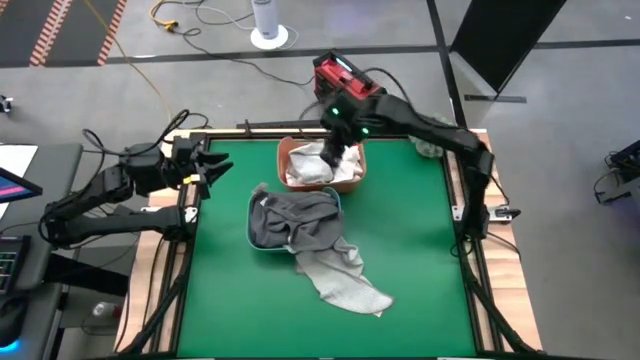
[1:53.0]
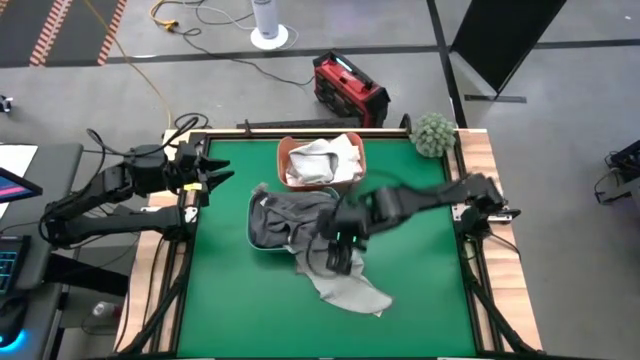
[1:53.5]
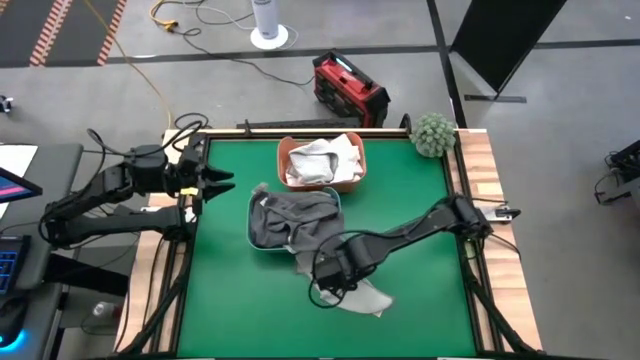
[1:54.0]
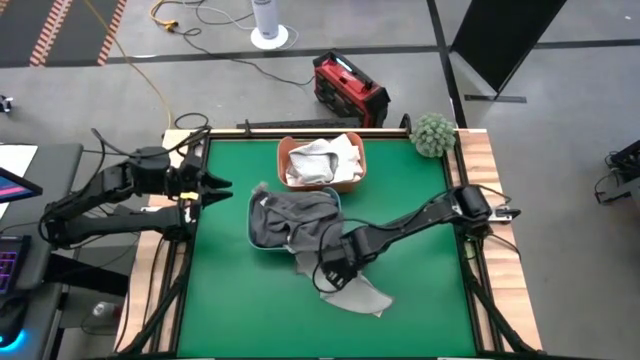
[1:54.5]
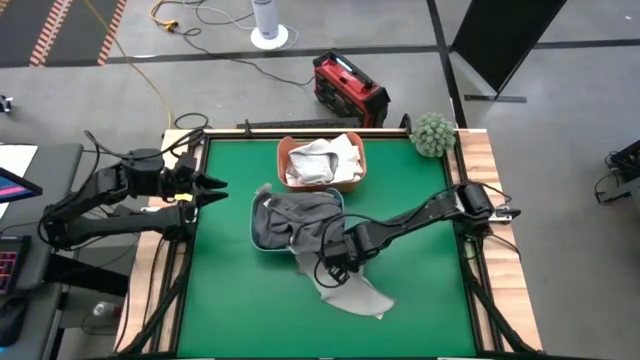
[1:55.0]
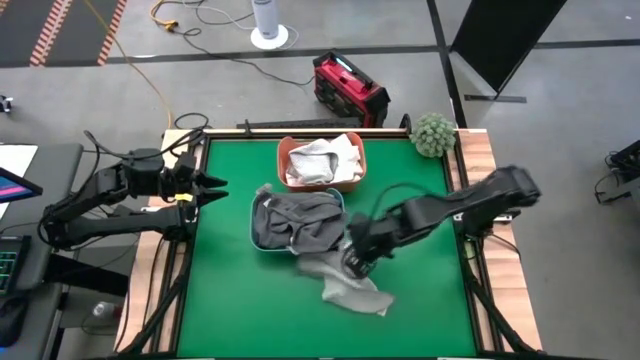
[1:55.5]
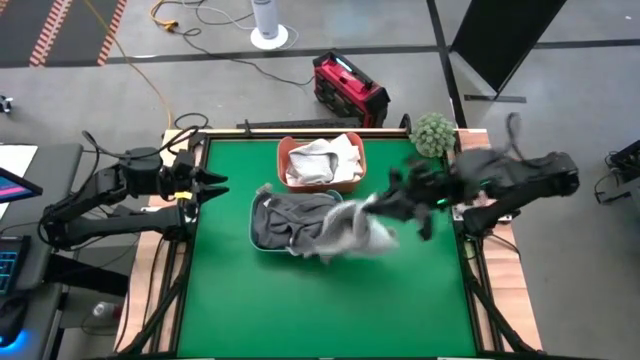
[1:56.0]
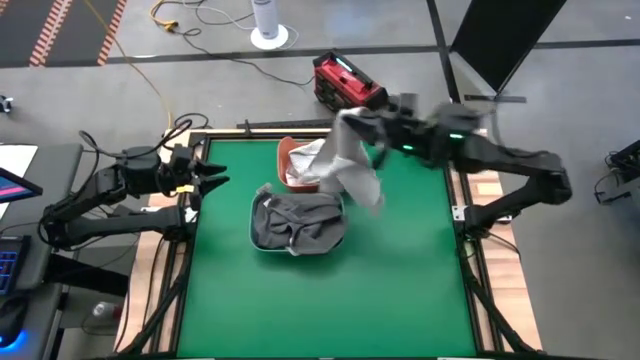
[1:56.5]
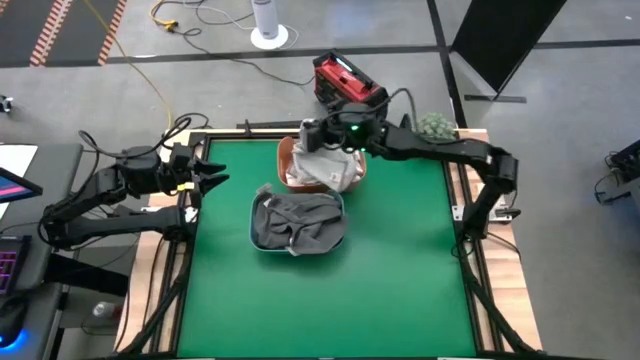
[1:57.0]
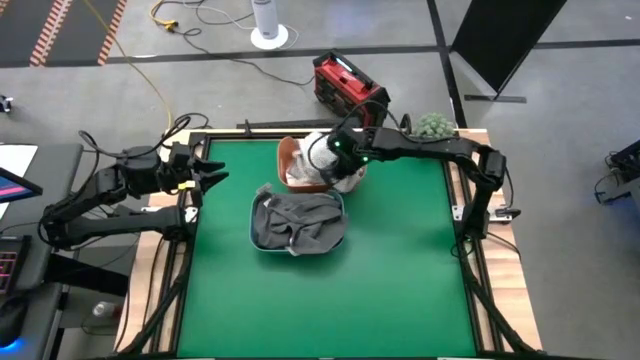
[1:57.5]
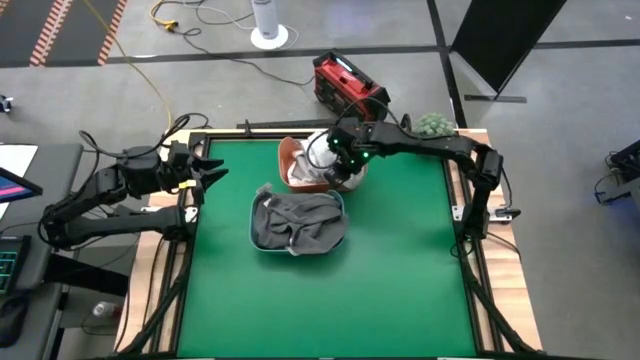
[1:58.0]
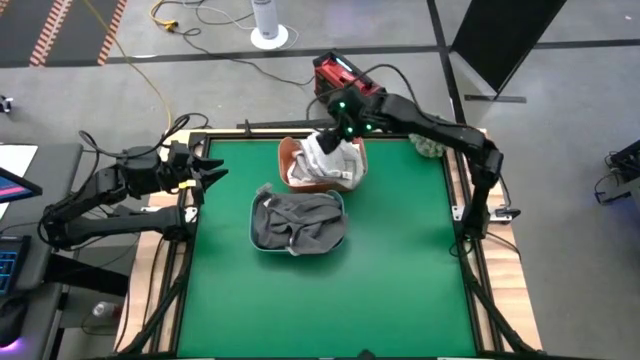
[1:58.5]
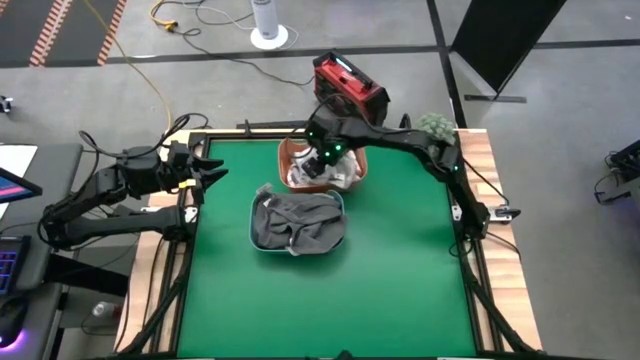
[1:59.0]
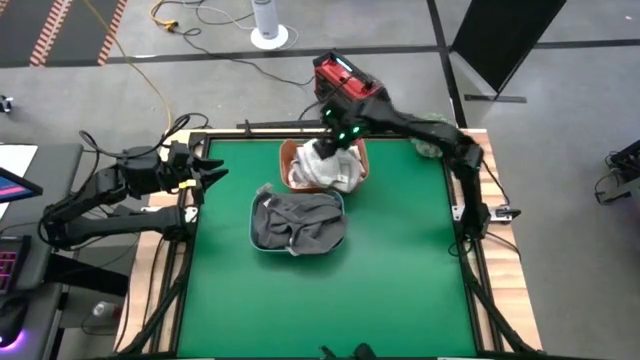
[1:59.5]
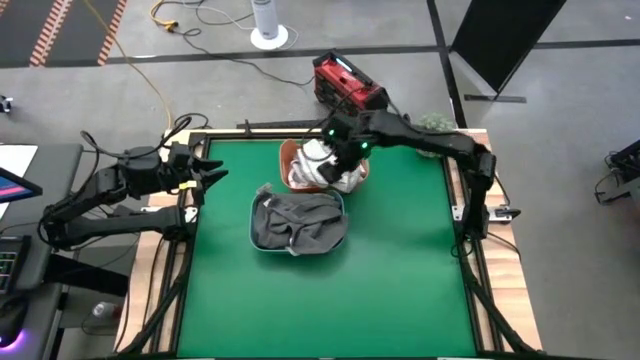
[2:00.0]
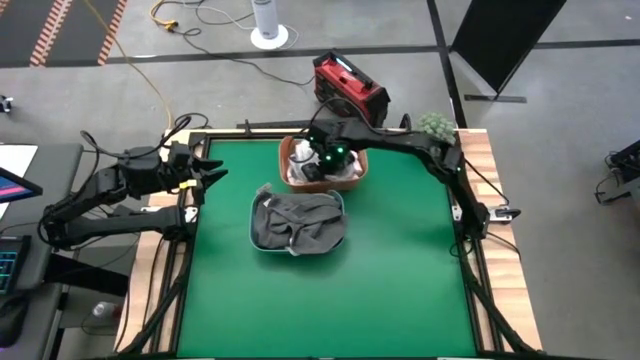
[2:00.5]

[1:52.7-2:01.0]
Task: Sort towels by color in basket
Put the white patterned towel into the orange bin

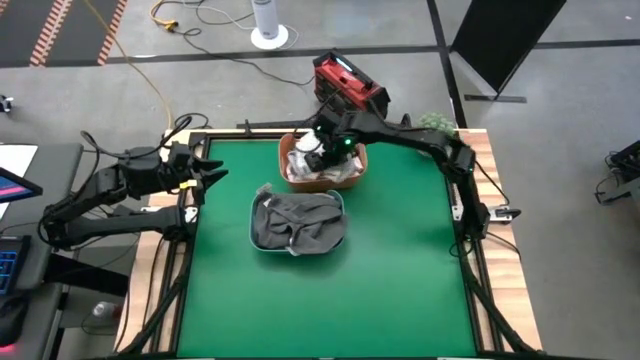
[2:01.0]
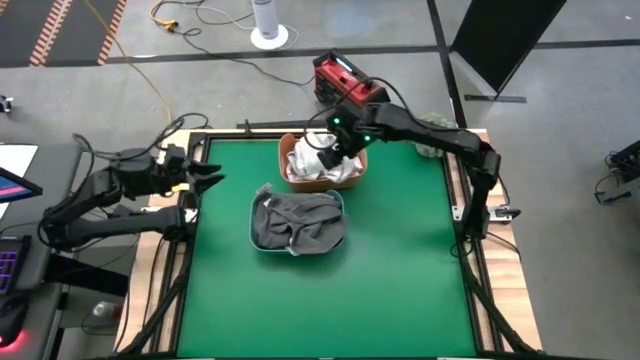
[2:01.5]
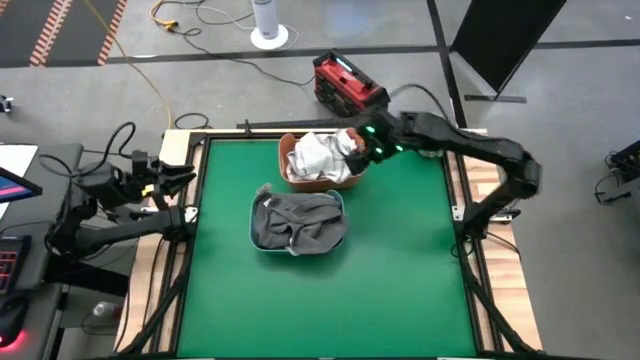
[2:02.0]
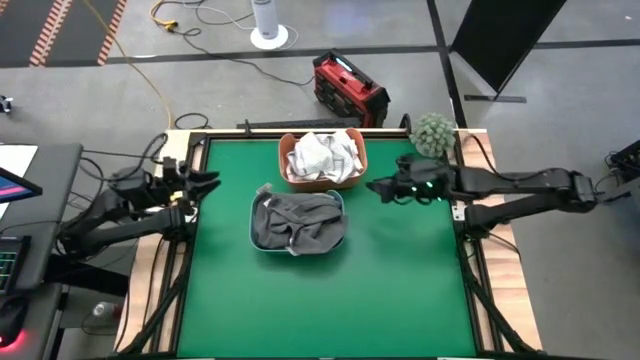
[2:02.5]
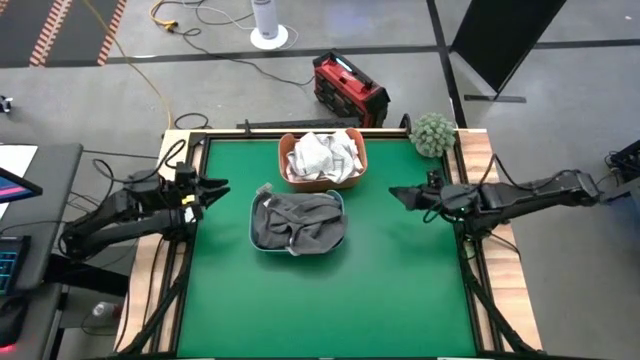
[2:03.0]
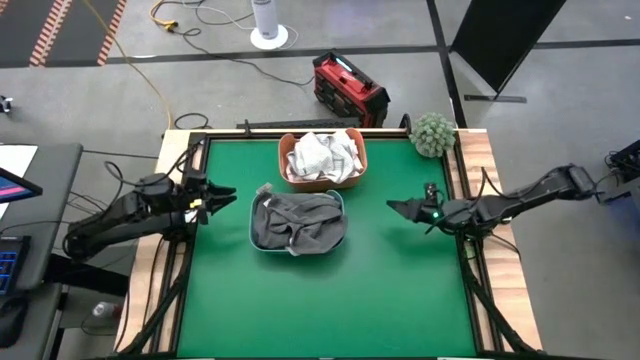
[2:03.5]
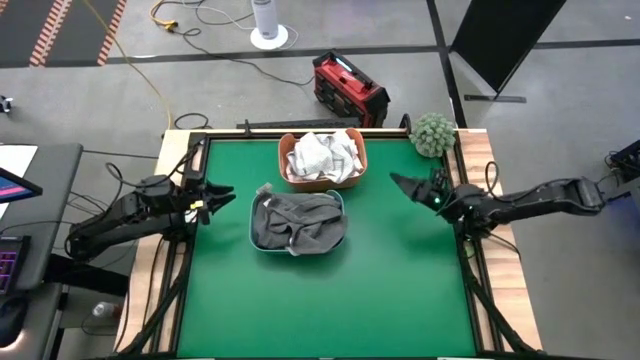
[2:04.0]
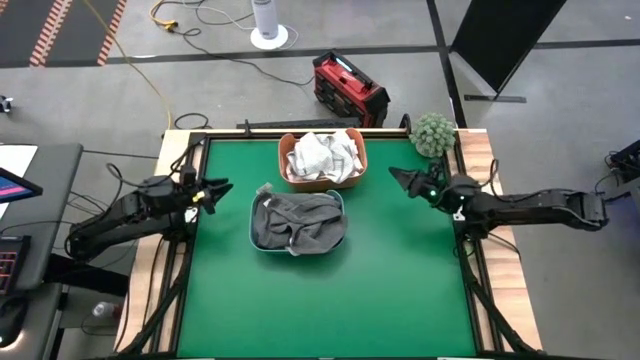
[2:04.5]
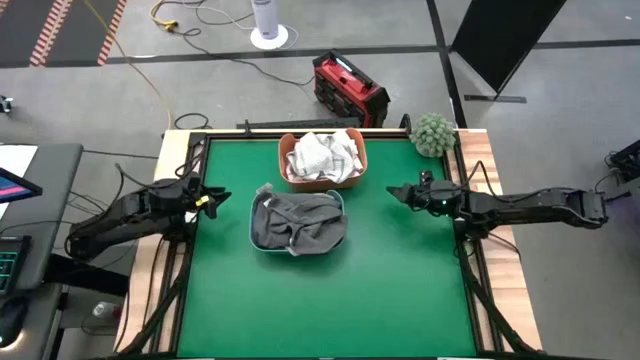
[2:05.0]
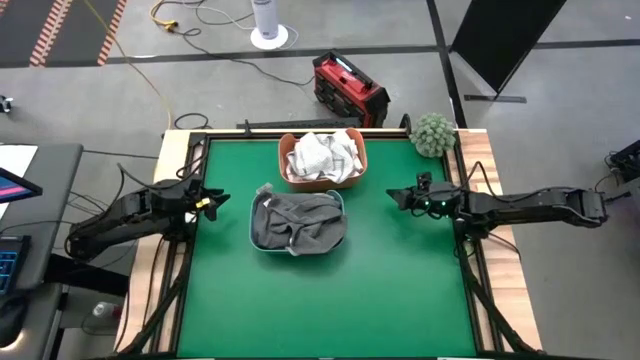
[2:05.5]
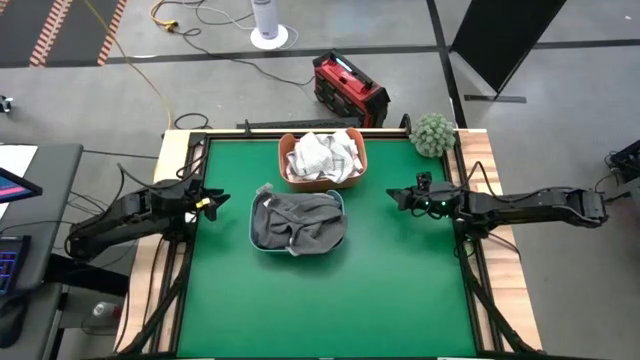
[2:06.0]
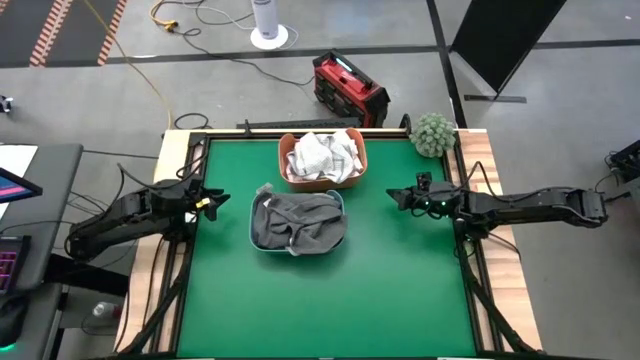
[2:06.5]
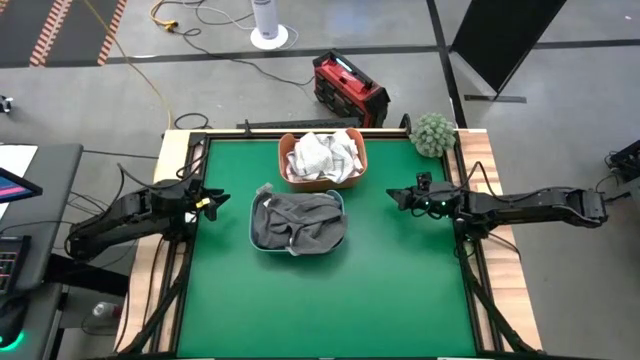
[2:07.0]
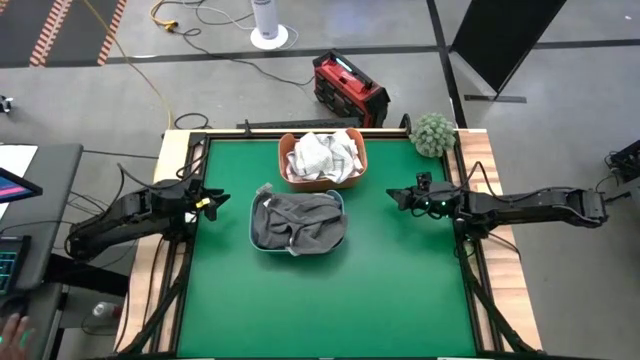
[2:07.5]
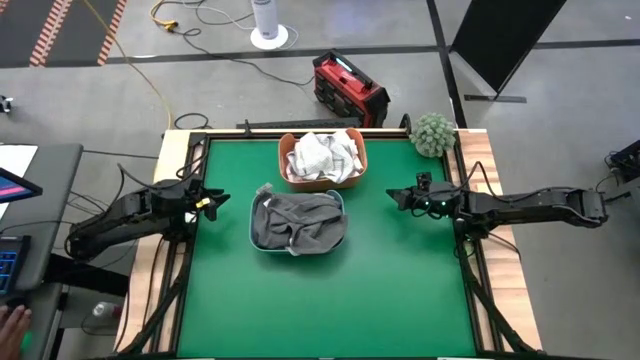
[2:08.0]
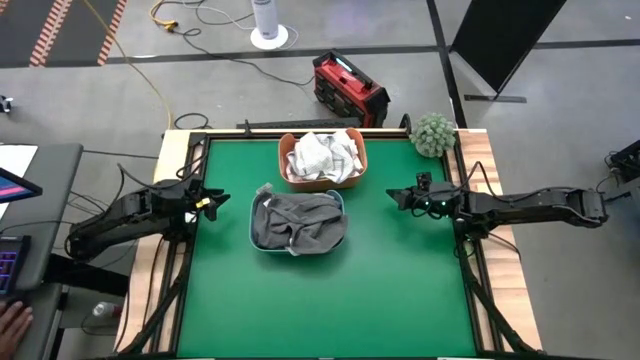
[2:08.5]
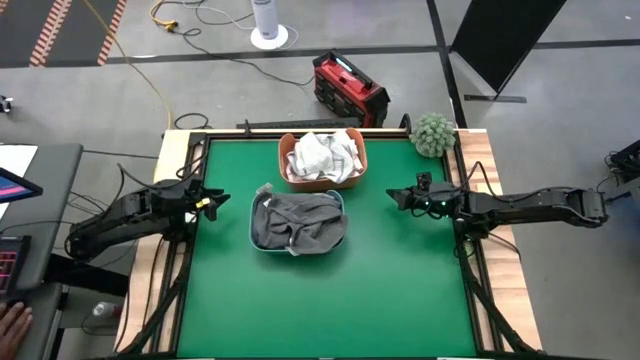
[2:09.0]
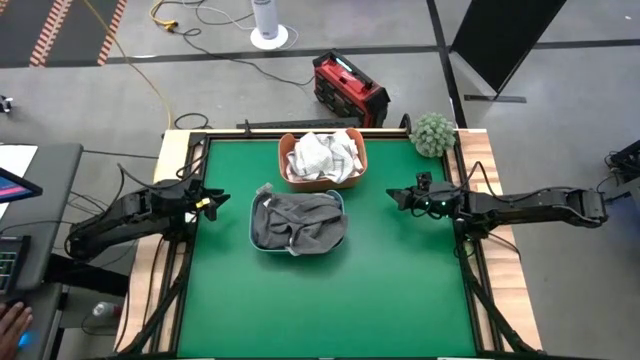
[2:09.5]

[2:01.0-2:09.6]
Return to Home Position

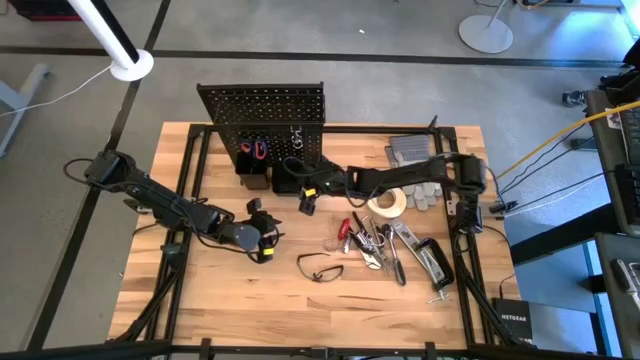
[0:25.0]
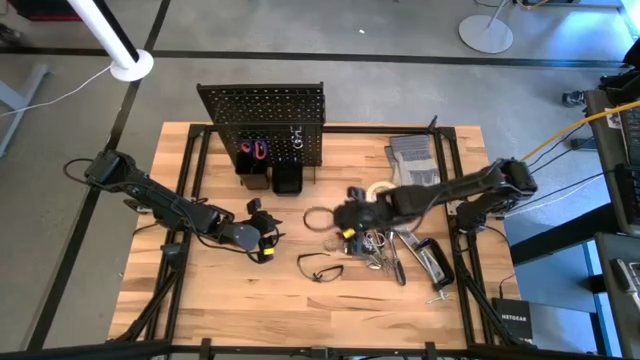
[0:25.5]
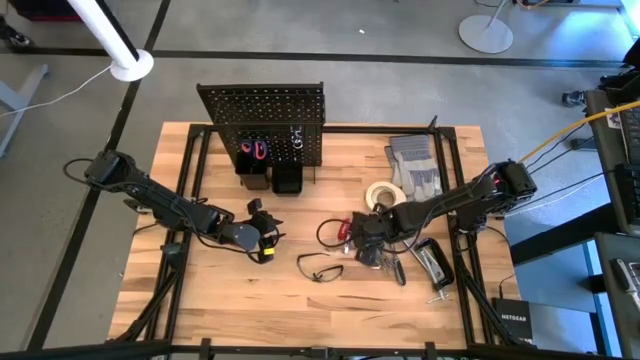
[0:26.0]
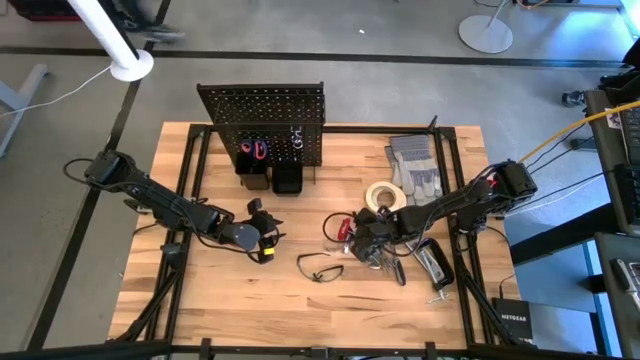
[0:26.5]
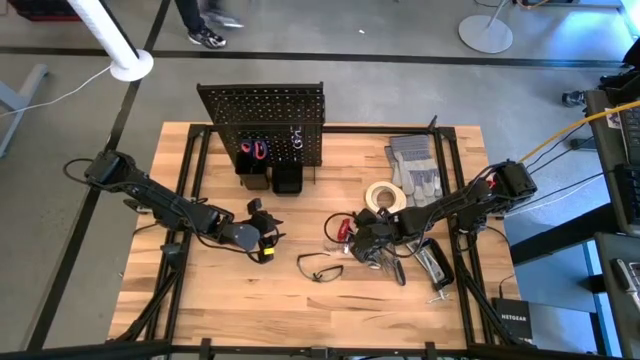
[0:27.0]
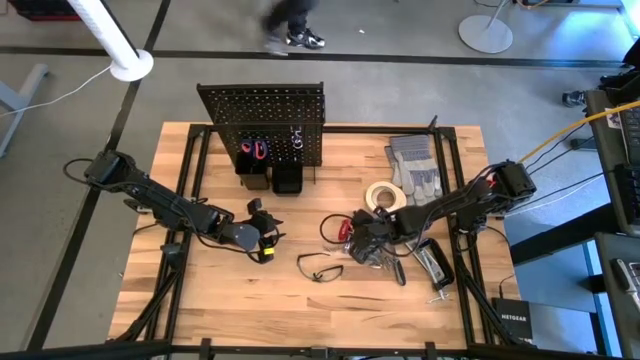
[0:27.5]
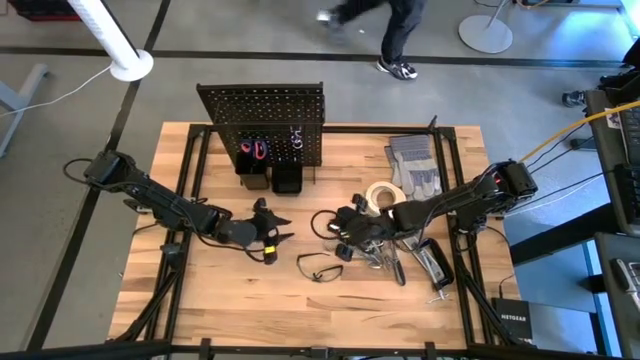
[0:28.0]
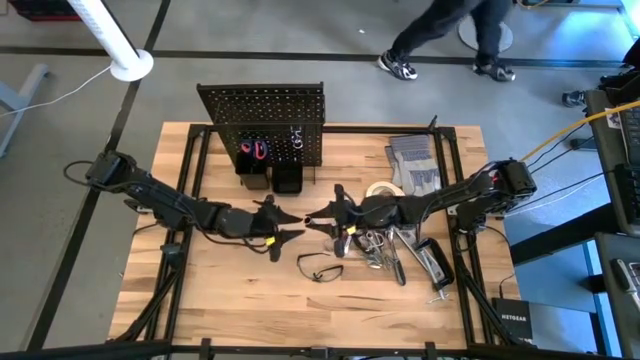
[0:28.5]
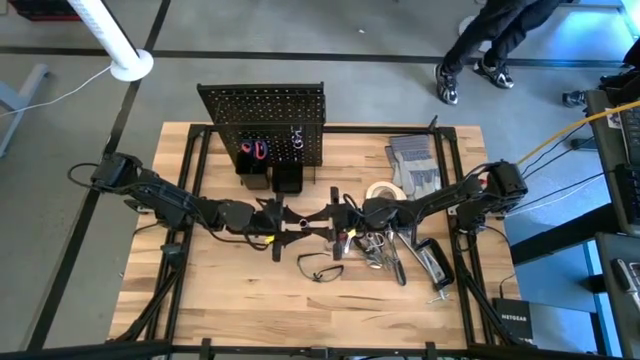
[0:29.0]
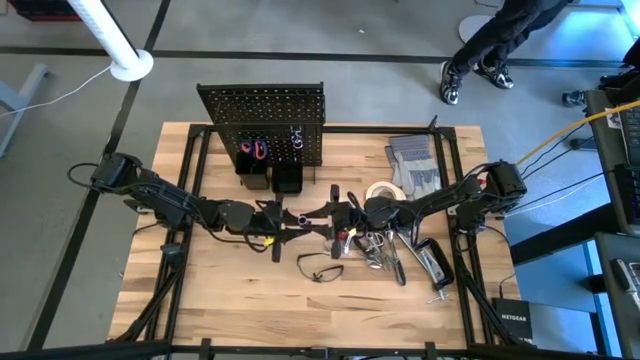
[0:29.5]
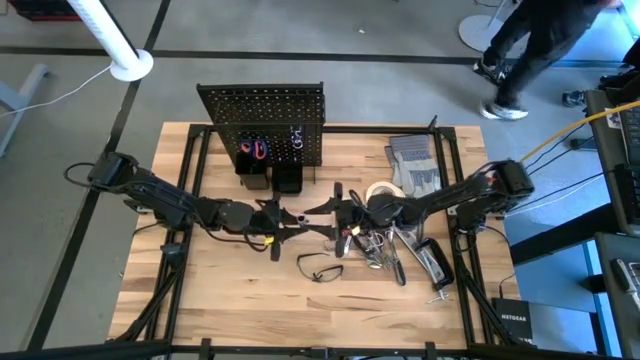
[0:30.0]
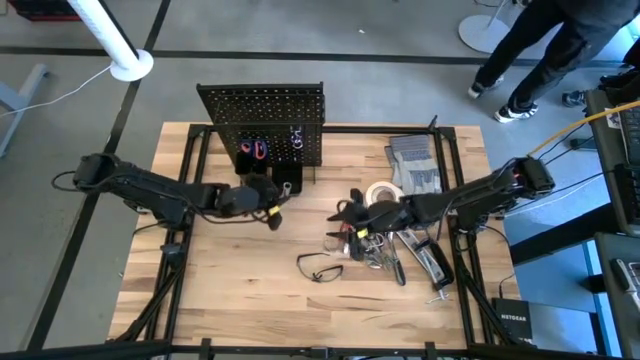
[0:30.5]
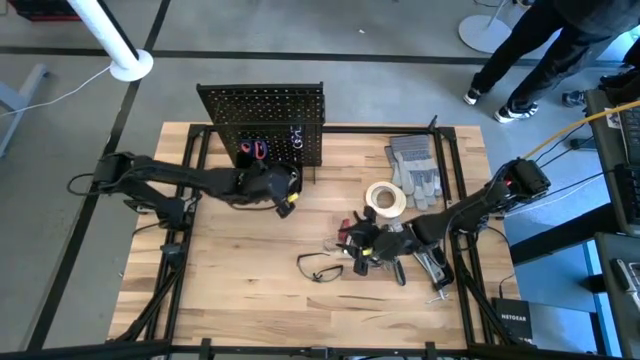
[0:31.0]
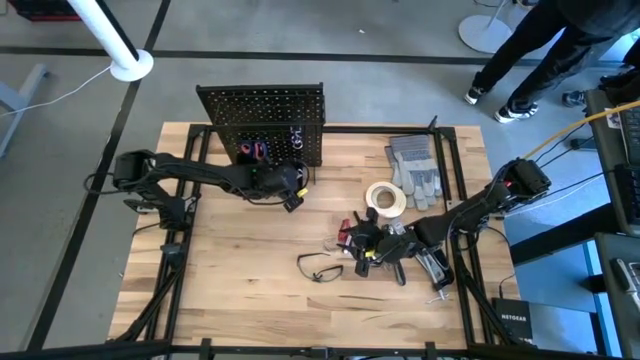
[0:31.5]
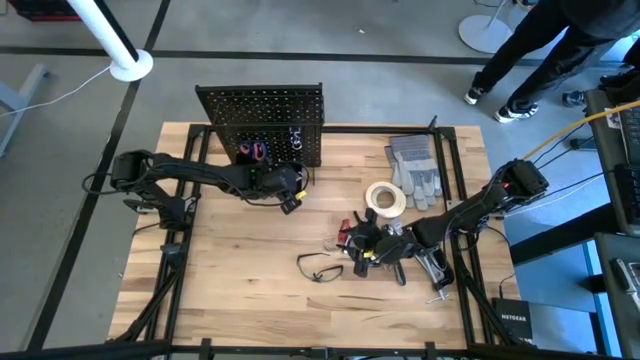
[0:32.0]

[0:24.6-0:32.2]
Task: Hang tools onto peg board
Put the socket wrench into the right pegboard organizer bin
